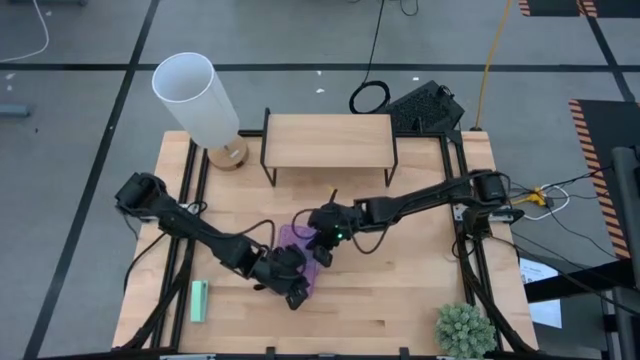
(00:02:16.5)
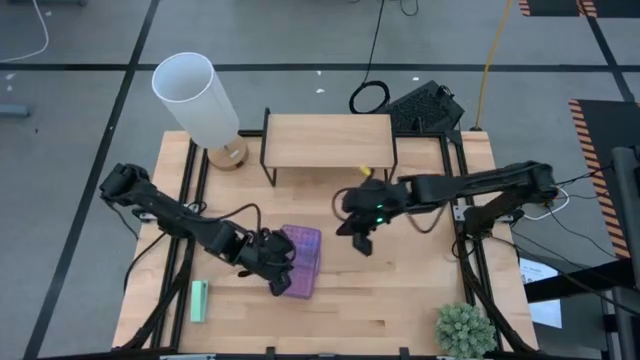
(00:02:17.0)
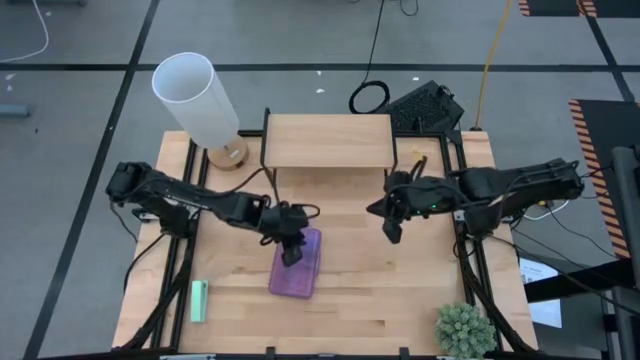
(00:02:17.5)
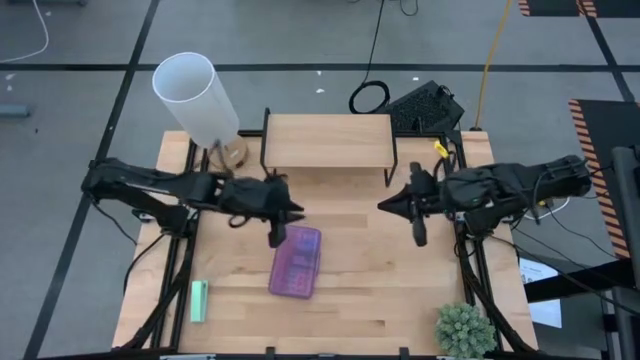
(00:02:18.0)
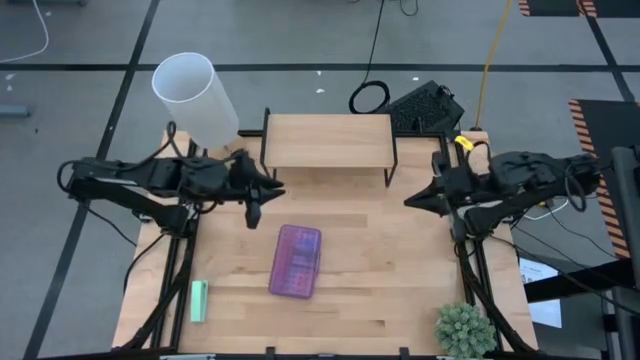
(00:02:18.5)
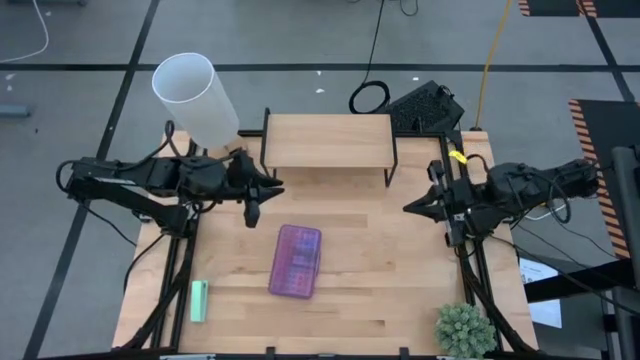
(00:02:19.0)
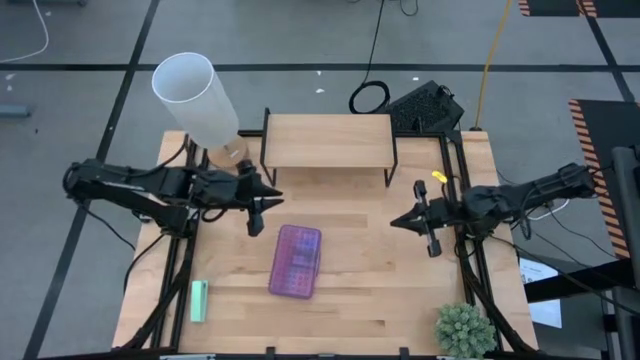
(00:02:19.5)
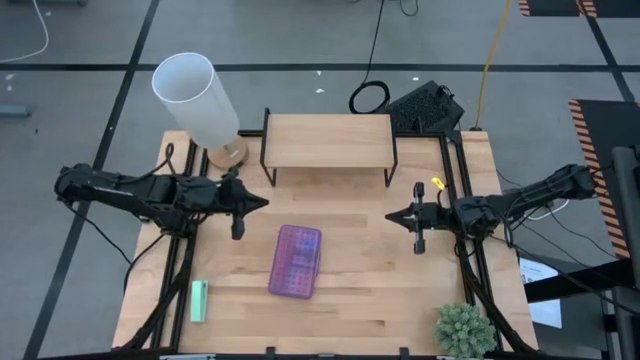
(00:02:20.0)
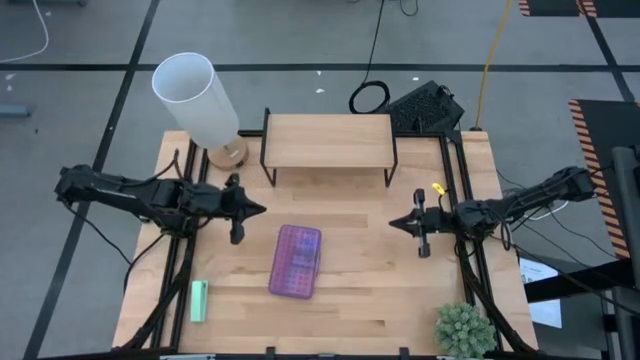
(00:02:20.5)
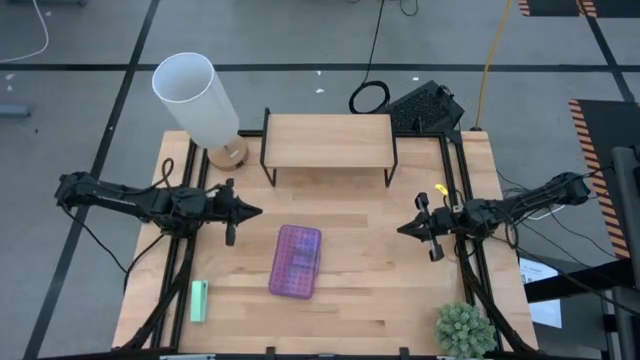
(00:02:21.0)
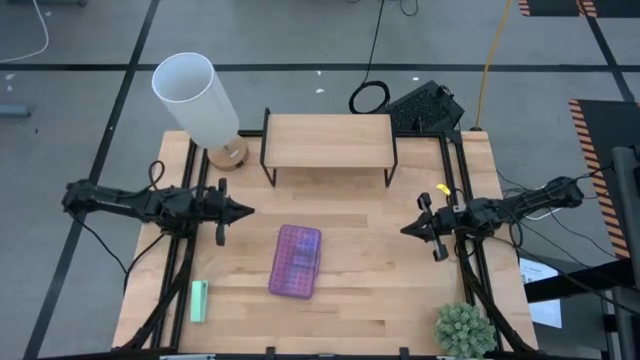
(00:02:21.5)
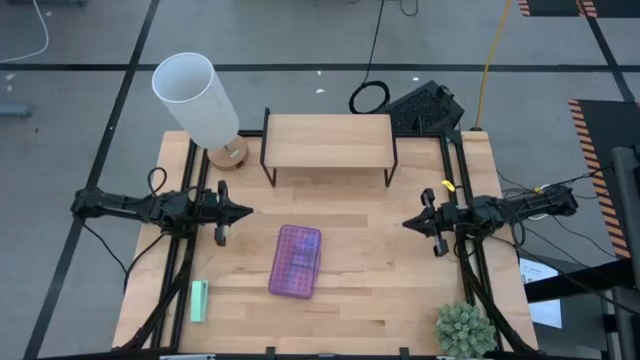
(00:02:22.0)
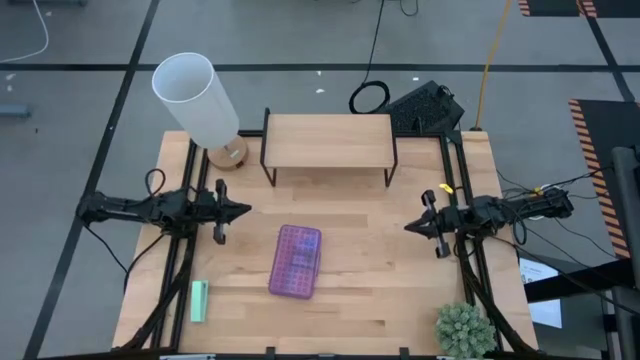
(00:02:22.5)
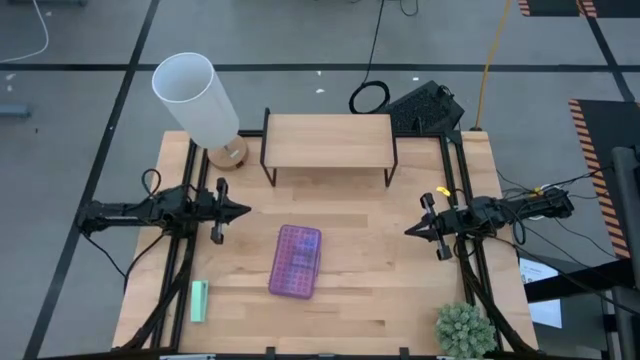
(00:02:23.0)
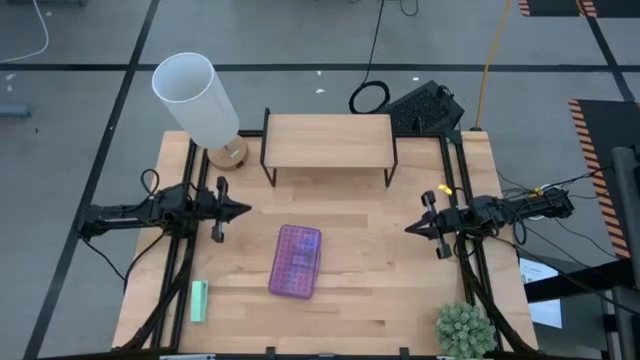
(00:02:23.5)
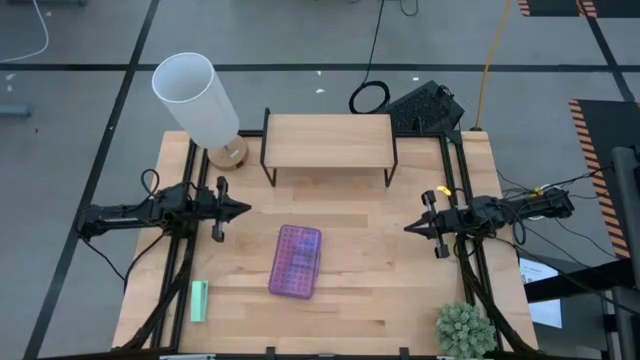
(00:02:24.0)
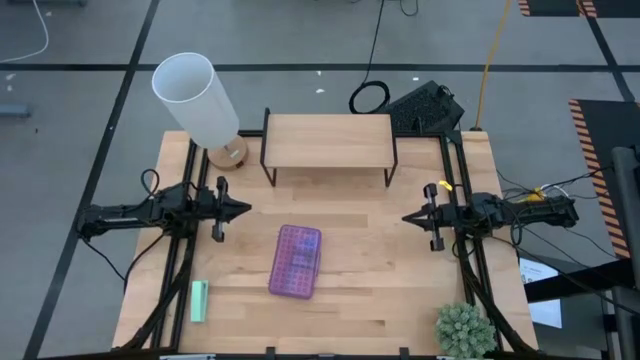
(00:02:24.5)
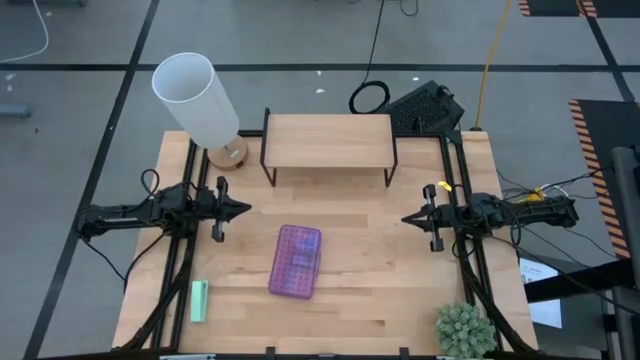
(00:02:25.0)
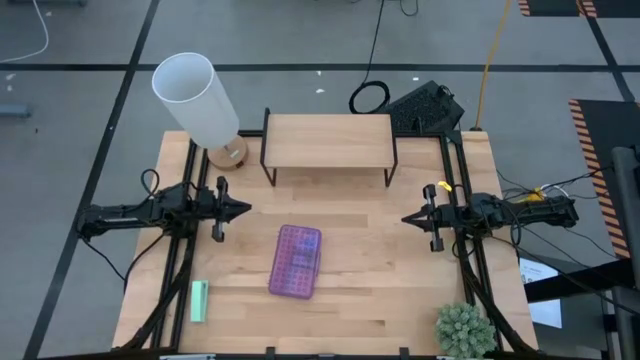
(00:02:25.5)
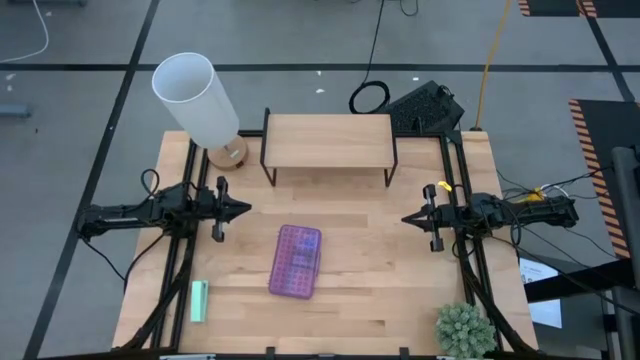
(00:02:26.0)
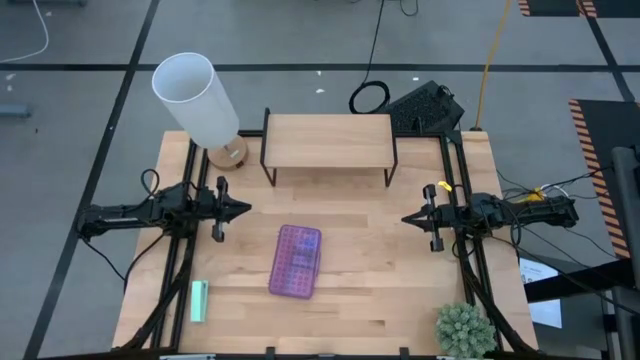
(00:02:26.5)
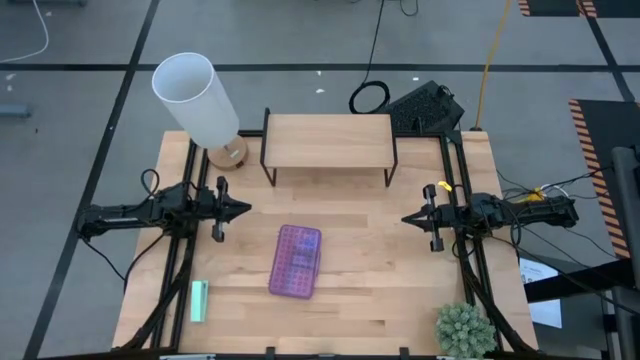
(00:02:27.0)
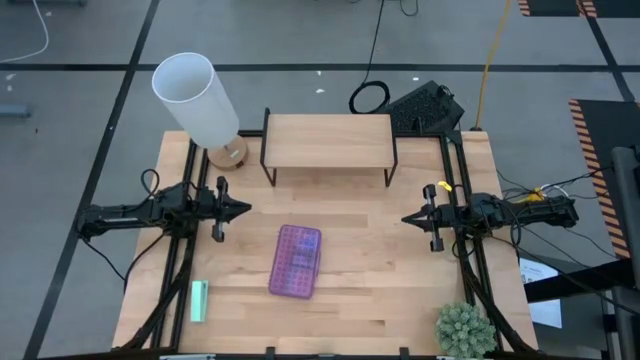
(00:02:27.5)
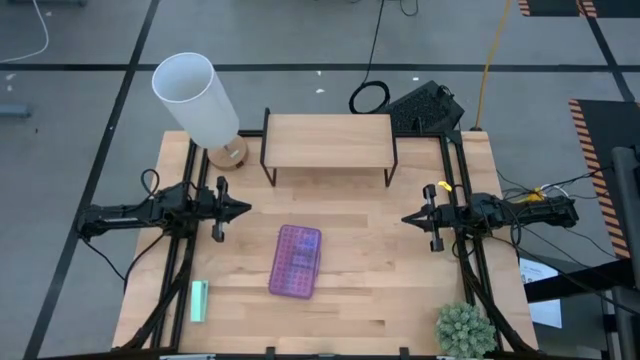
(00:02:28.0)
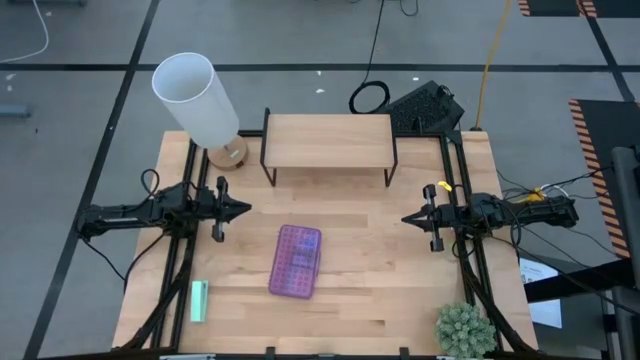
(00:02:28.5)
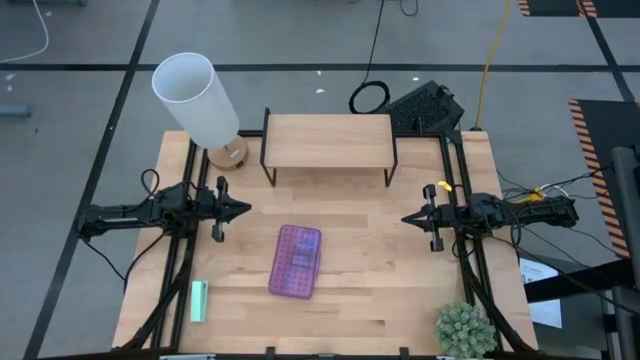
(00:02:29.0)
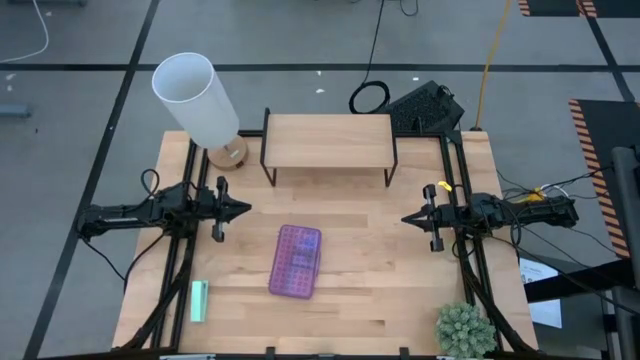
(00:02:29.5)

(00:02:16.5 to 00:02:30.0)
Task: Pack school essentials
Return to Home Position
